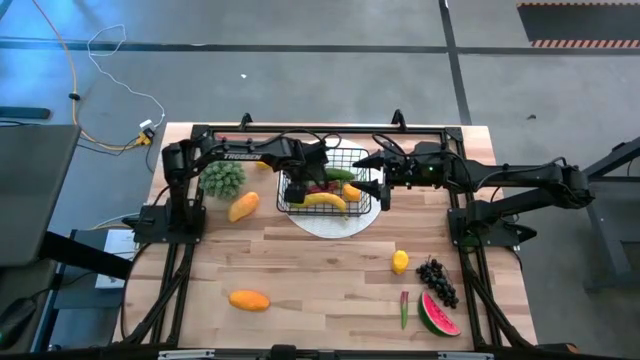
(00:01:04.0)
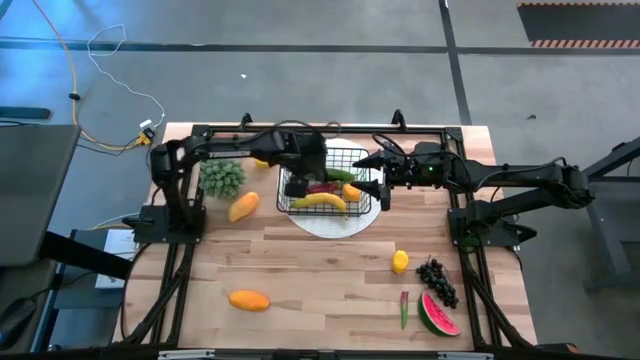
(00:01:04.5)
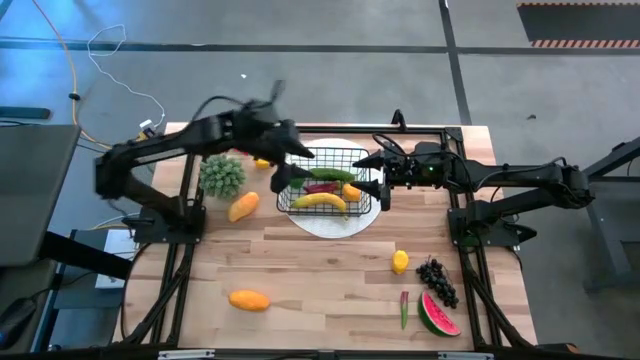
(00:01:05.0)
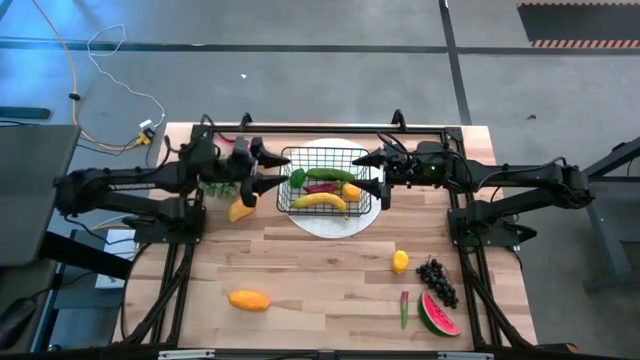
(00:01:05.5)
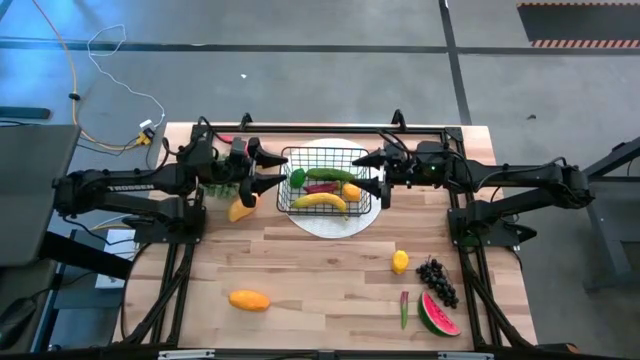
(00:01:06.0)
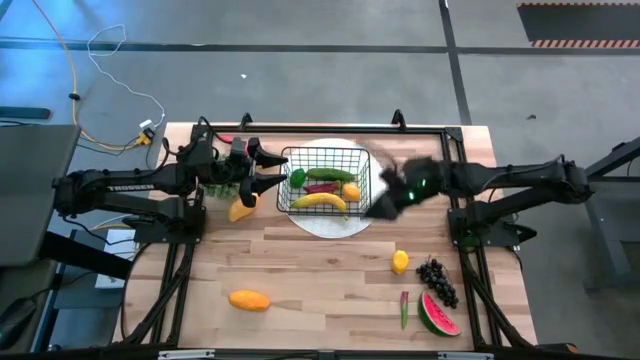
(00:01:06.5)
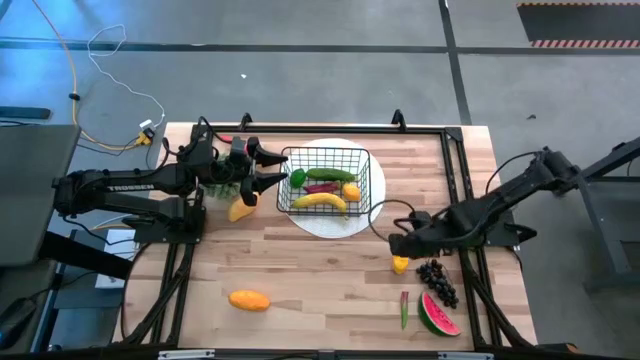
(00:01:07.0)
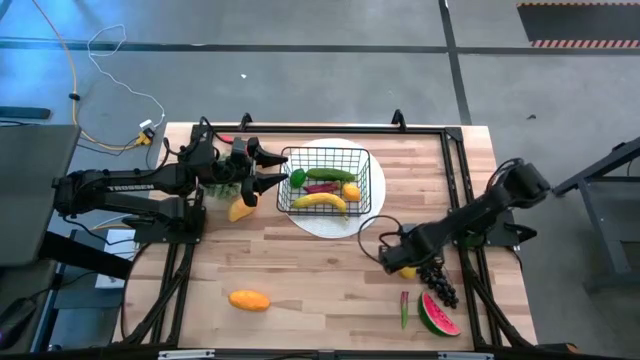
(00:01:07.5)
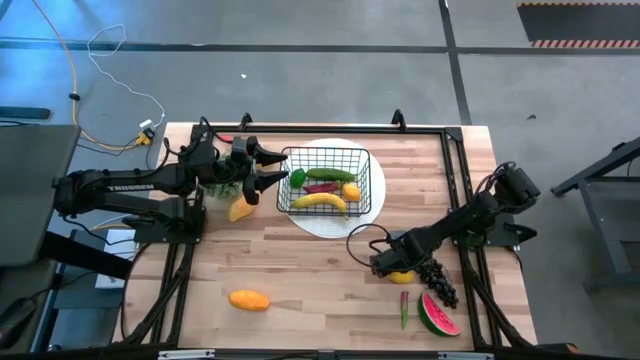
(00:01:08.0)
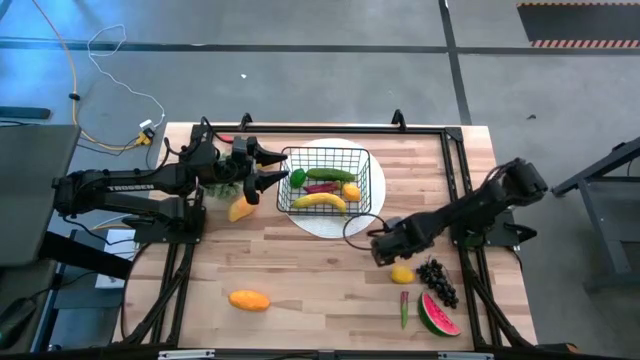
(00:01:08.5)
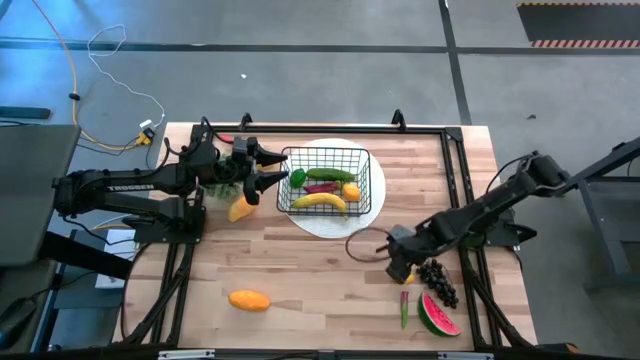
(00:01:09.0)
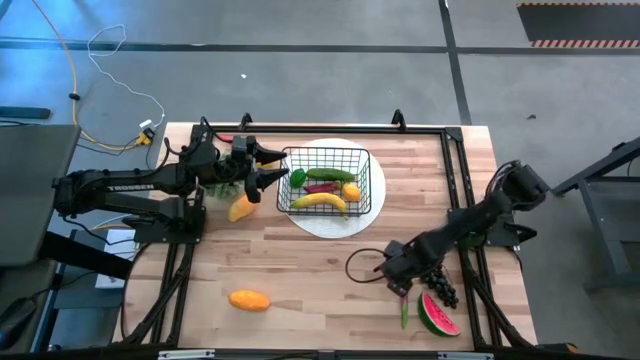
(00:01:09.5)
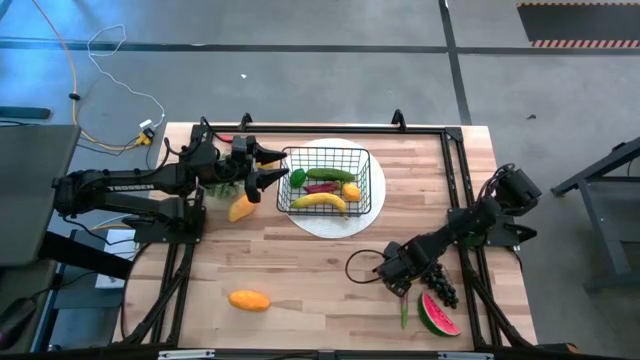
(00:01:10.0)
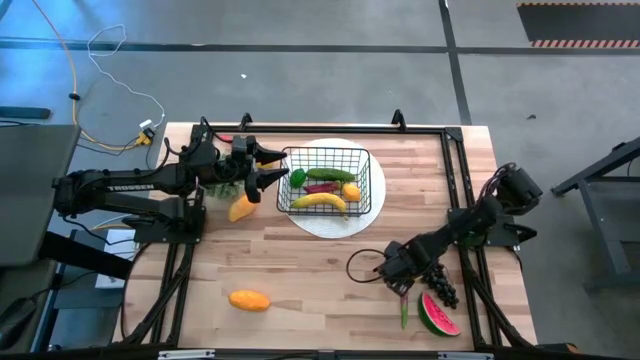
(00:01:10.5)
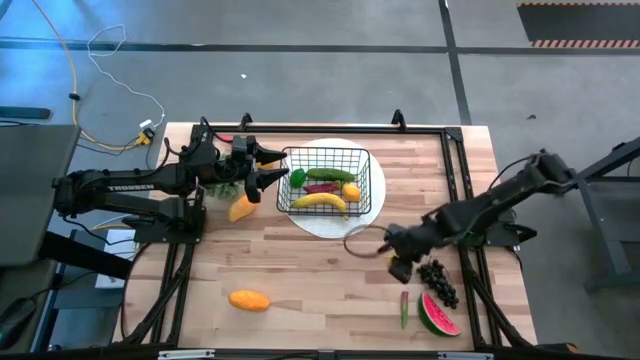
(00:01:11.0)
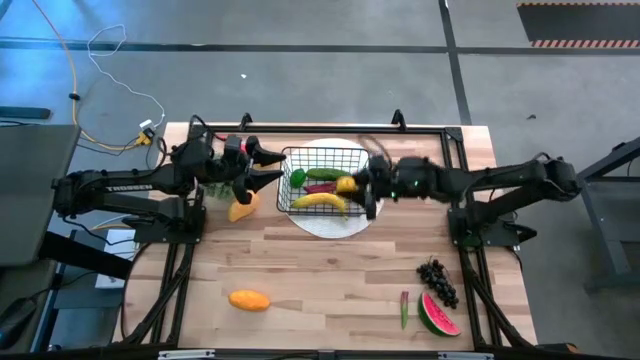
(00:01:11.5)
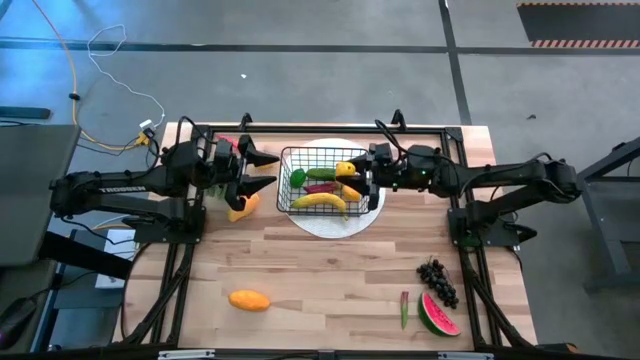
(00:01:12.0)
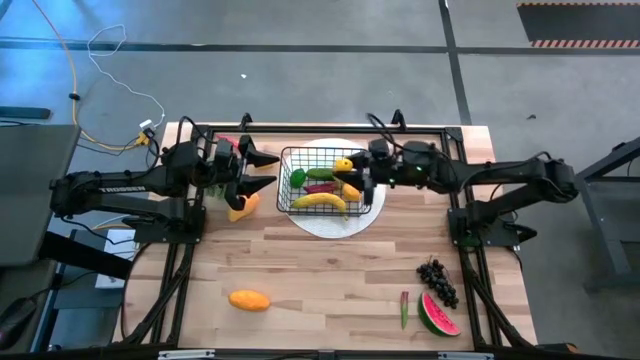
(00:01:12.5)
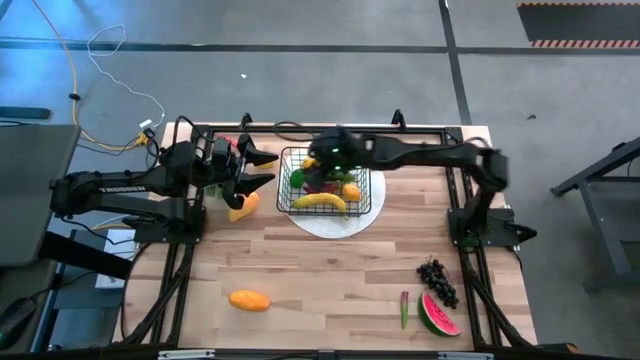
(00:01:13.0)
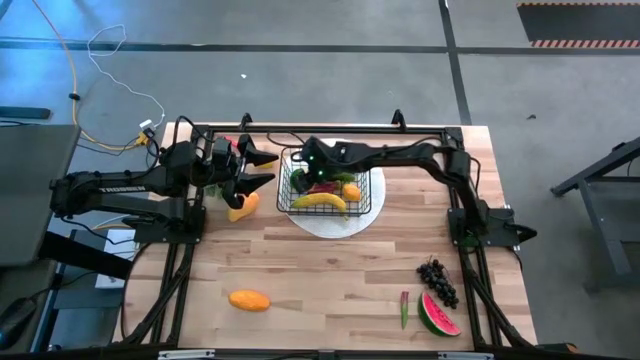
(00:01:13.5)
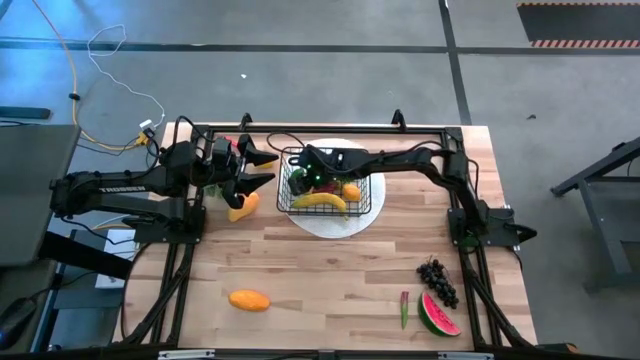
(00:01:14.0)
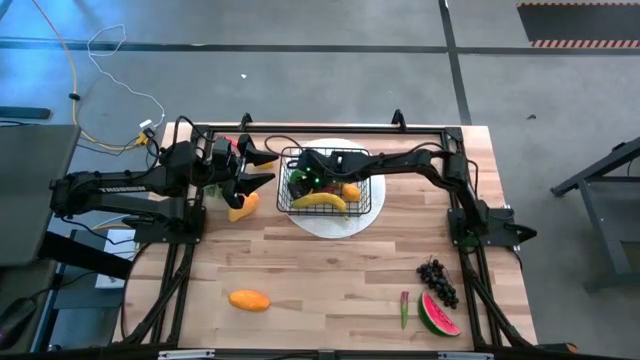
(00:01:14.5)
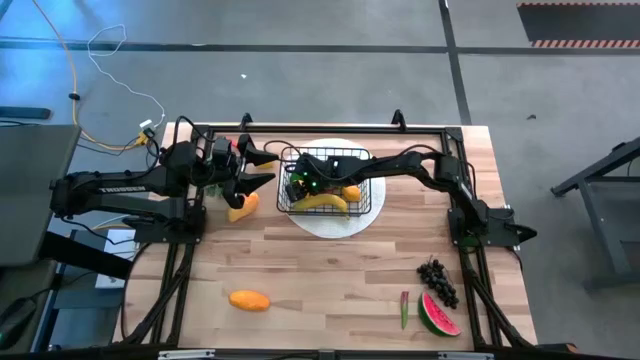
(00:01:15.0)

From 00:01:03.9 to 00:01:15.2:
Task: Build produce basket
Put the bottom right yellow lemon into the wire basket

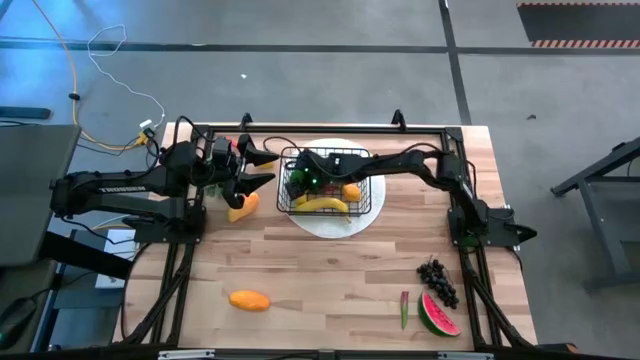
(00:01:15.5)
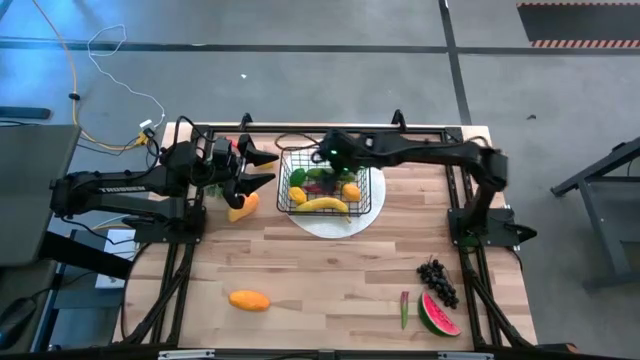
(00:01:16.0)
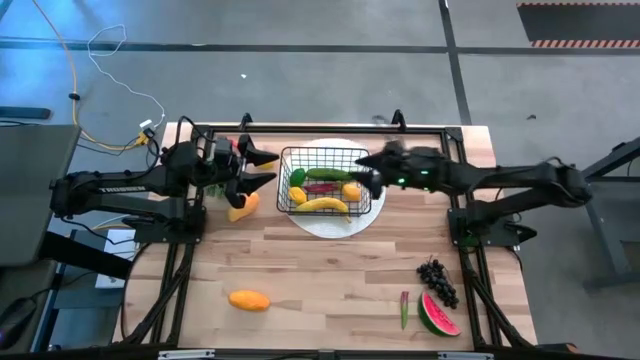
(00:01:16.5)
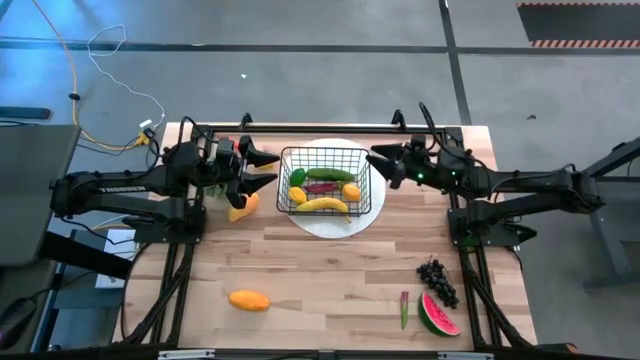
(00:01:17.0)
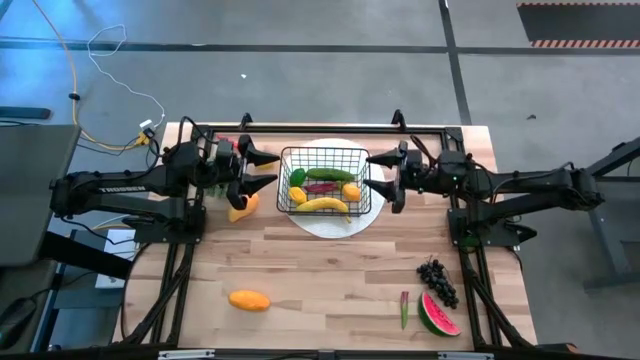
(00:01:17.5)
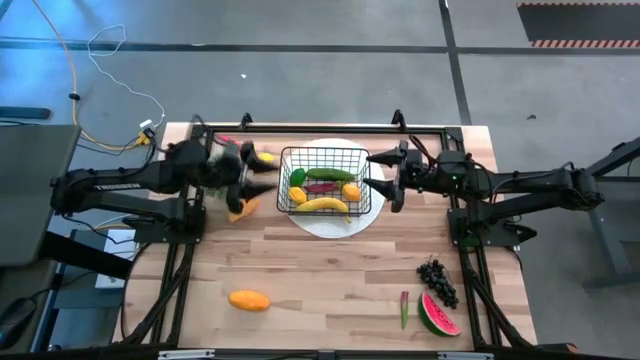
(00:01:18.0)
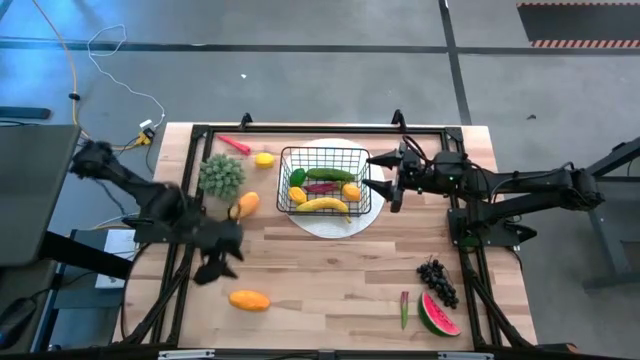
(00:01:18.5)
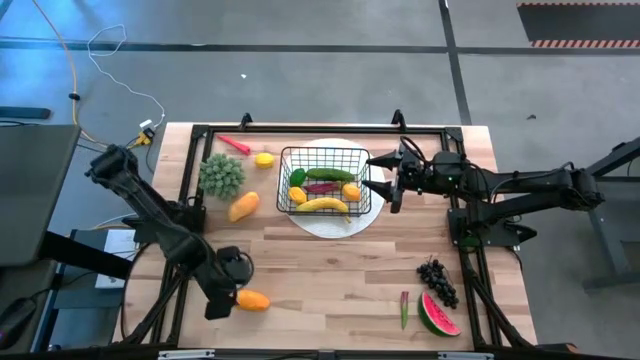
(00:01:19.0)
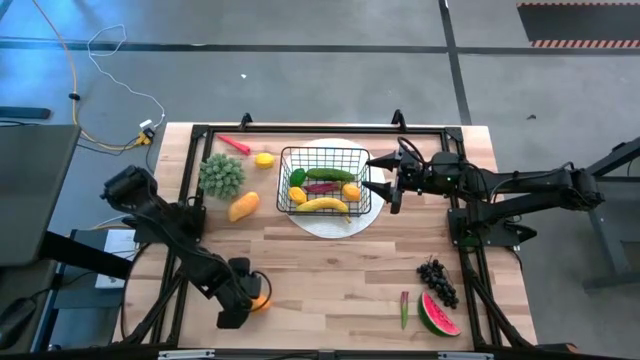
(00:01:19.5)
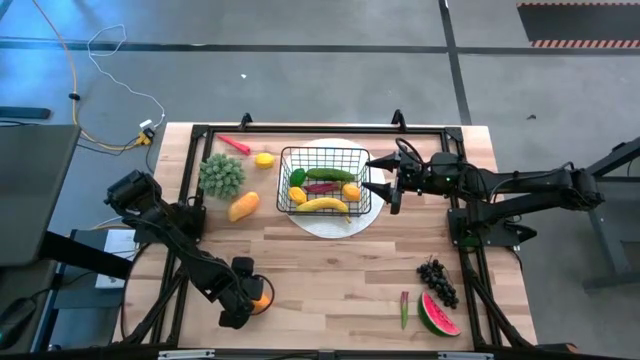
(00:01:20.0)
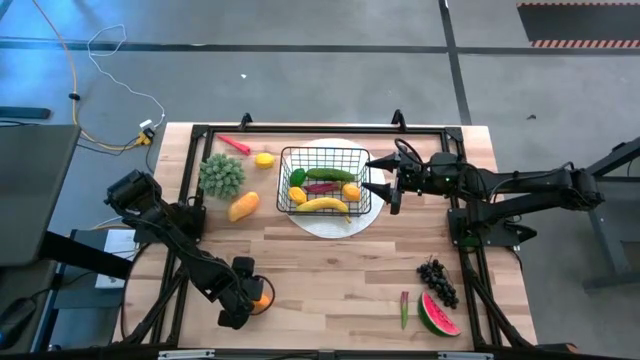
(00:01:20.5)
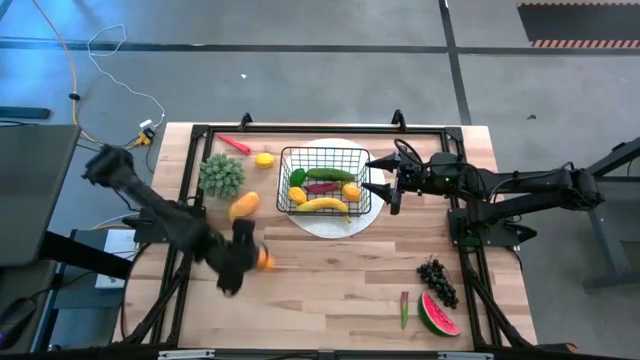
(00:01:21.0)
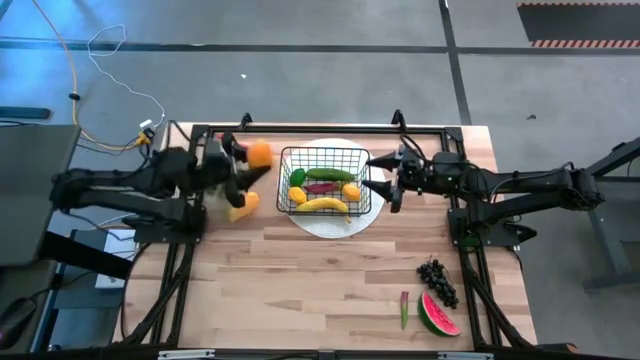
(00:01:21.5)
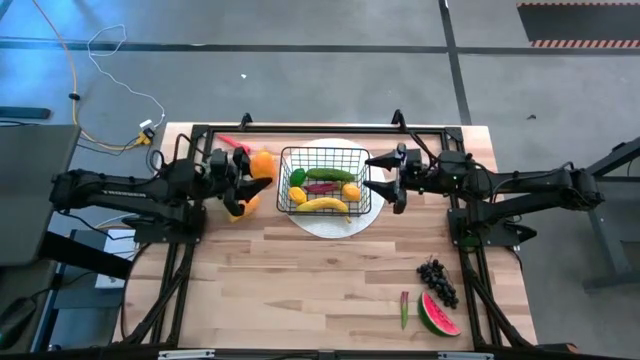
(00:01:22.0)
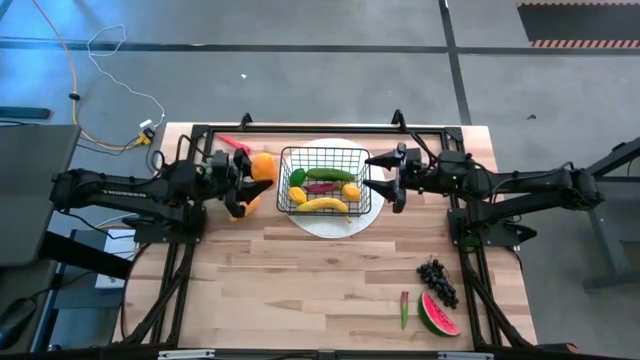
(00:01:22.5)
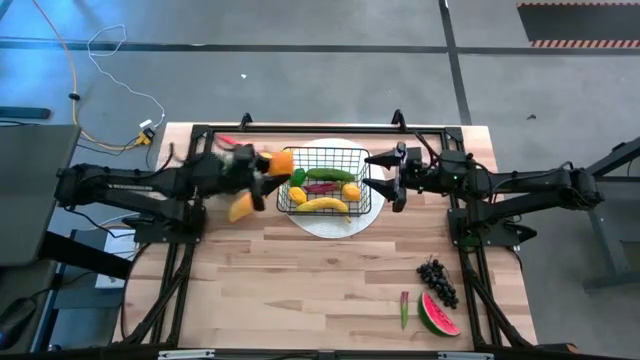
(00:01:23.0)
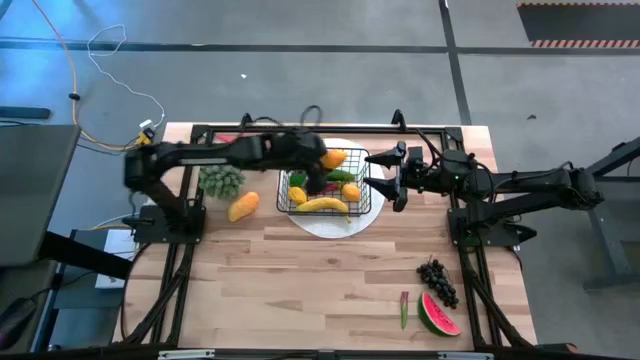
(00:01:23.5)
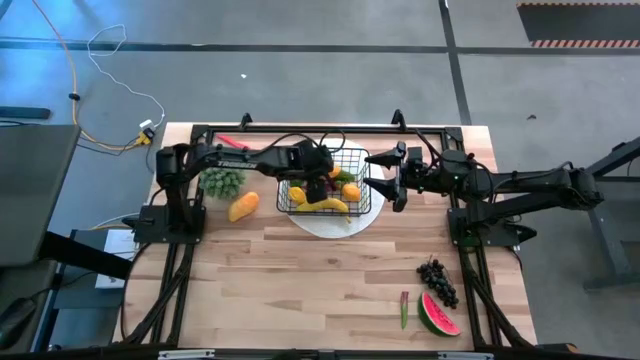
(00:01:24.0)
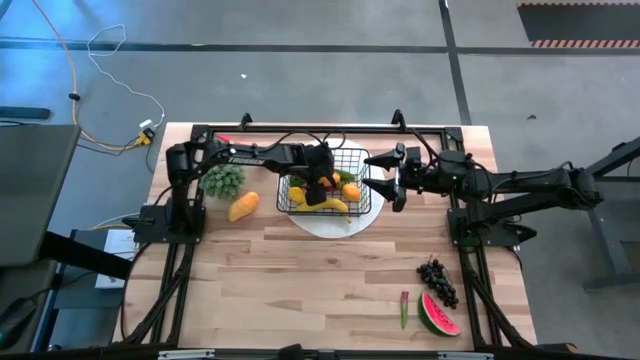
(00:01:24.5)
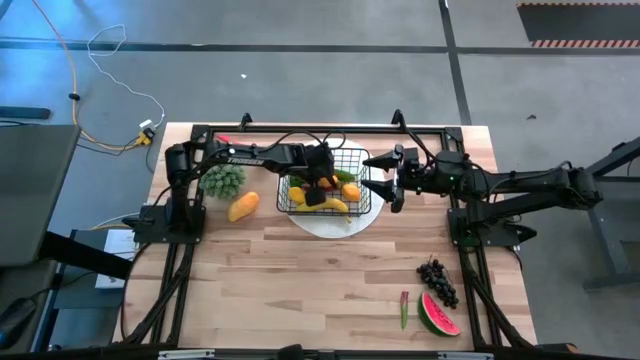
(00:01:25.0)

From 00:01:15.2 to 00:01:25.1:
Put the bottom yellow mango into the wire basket
